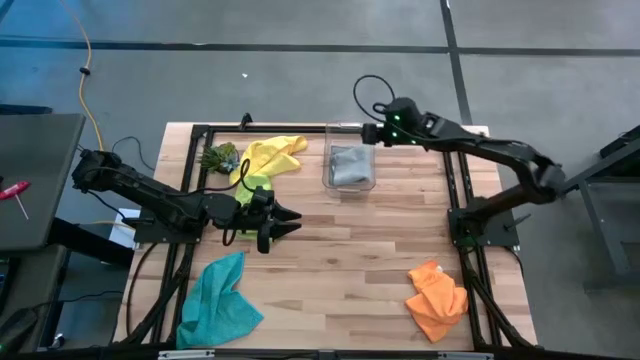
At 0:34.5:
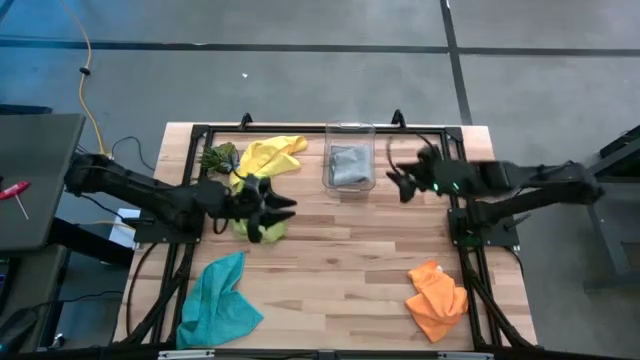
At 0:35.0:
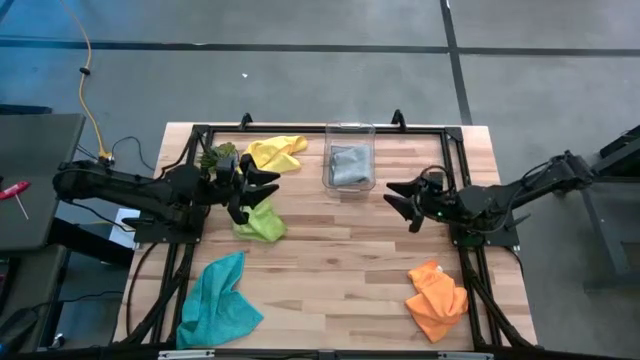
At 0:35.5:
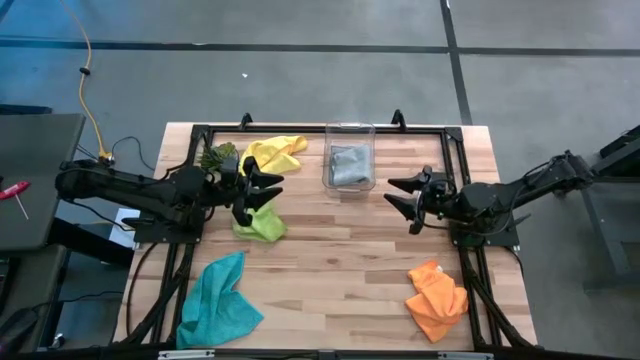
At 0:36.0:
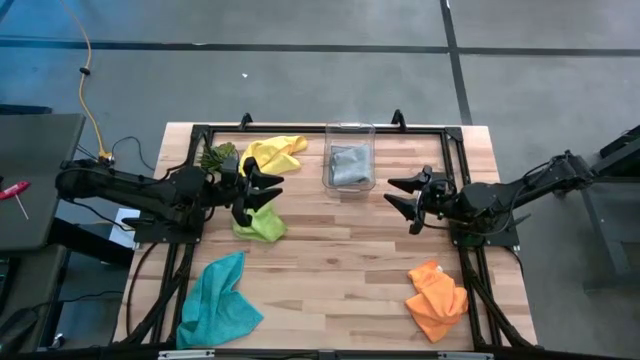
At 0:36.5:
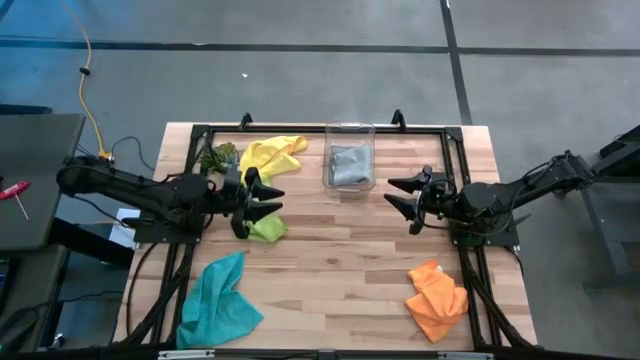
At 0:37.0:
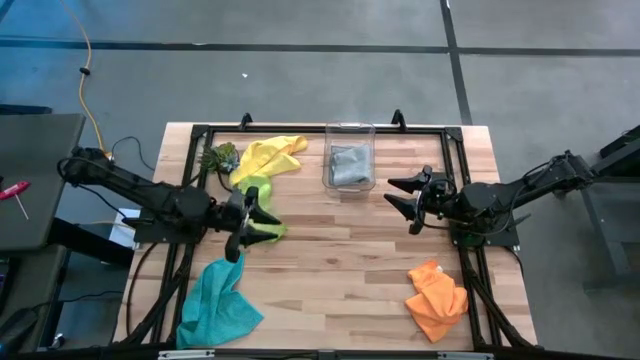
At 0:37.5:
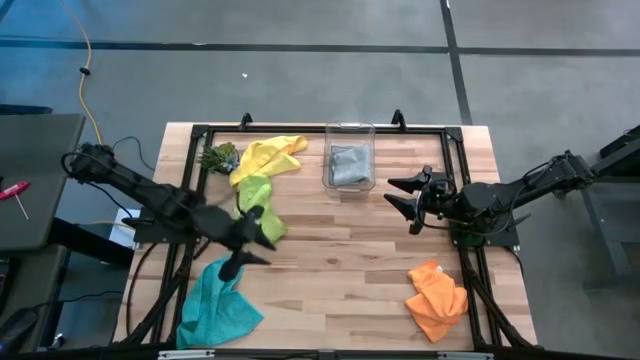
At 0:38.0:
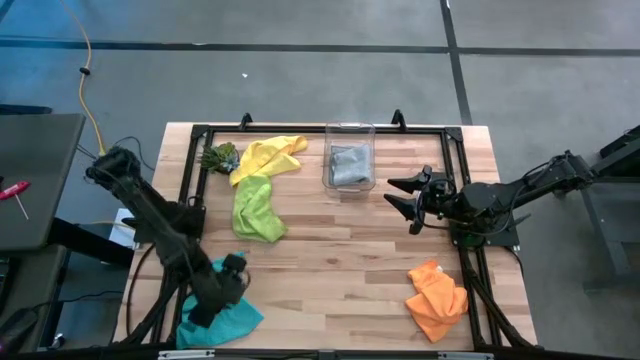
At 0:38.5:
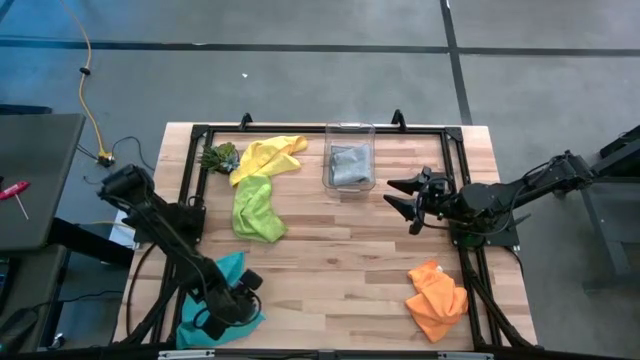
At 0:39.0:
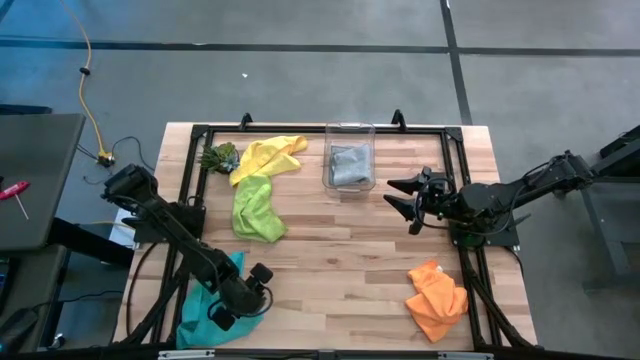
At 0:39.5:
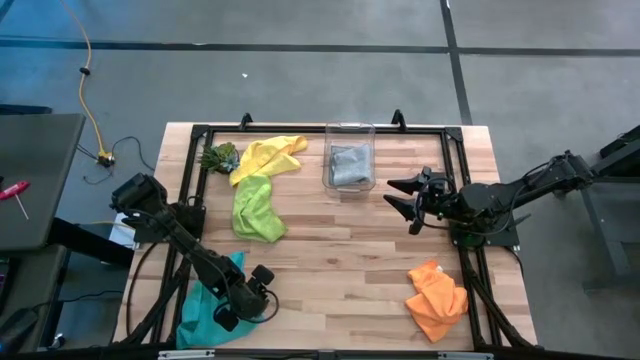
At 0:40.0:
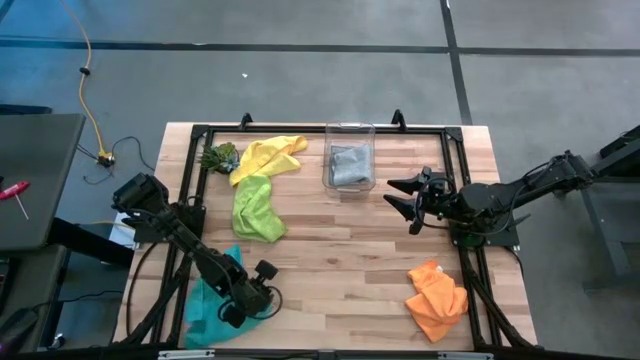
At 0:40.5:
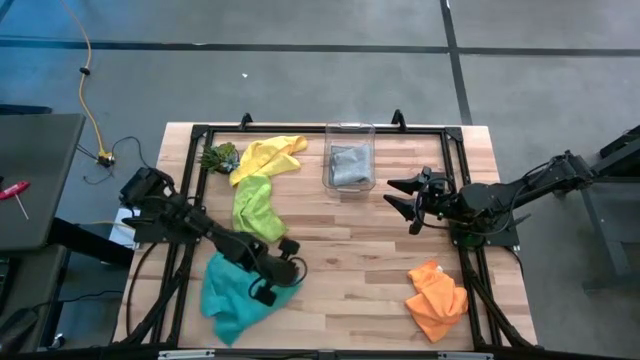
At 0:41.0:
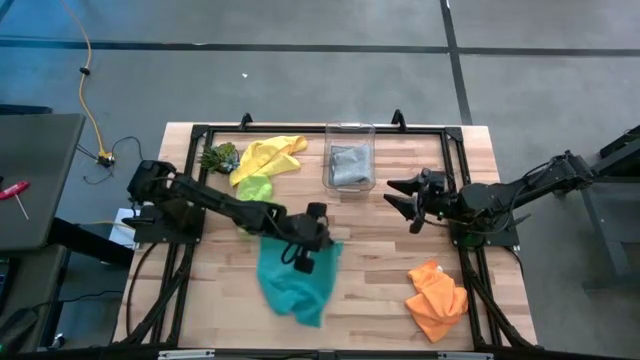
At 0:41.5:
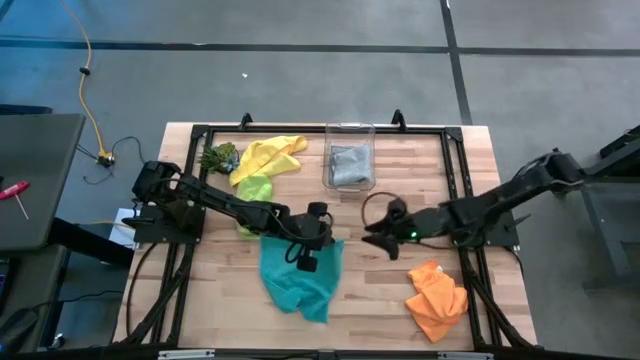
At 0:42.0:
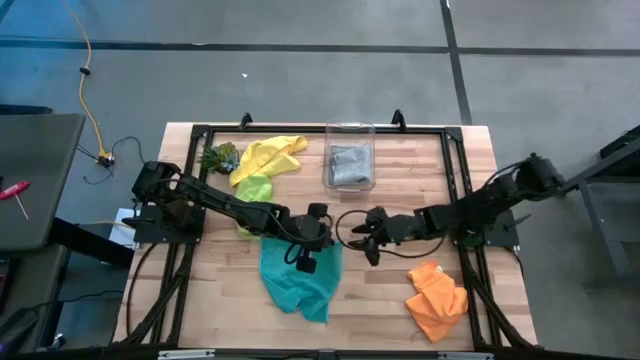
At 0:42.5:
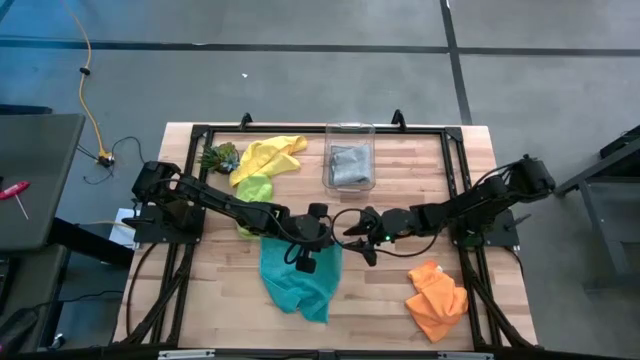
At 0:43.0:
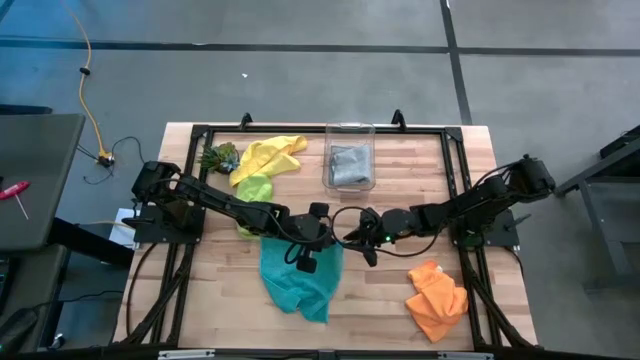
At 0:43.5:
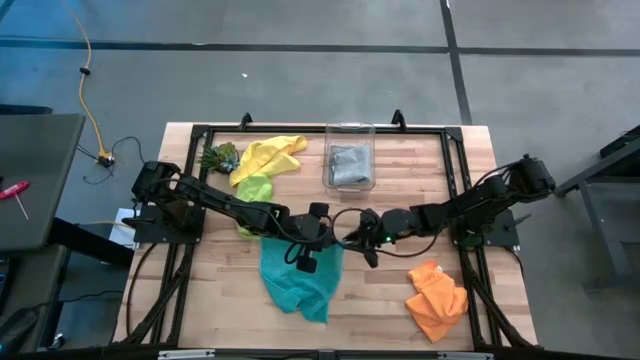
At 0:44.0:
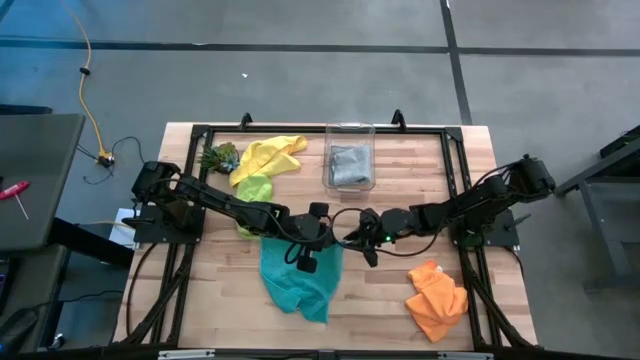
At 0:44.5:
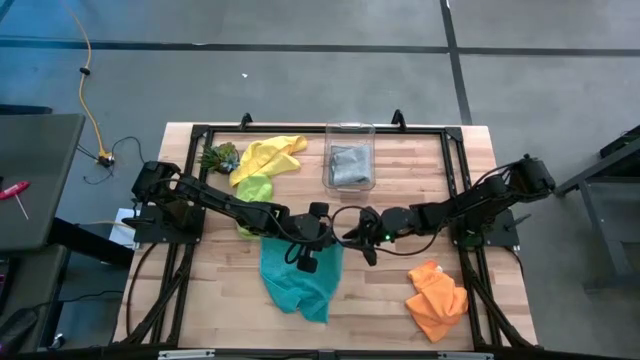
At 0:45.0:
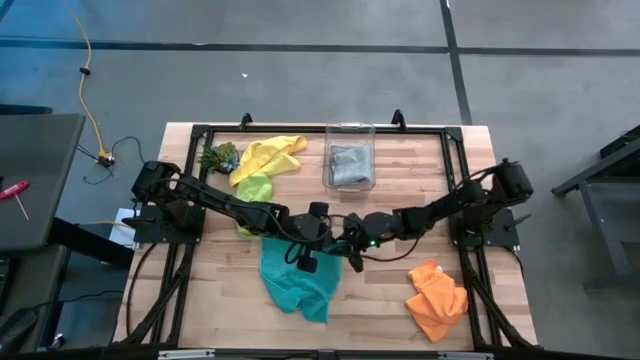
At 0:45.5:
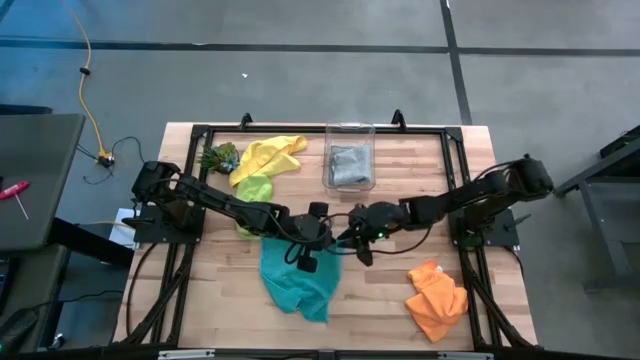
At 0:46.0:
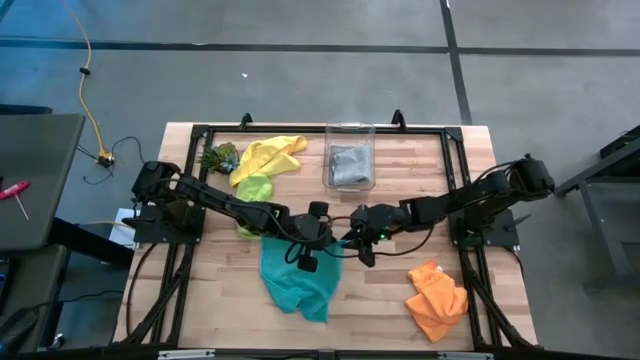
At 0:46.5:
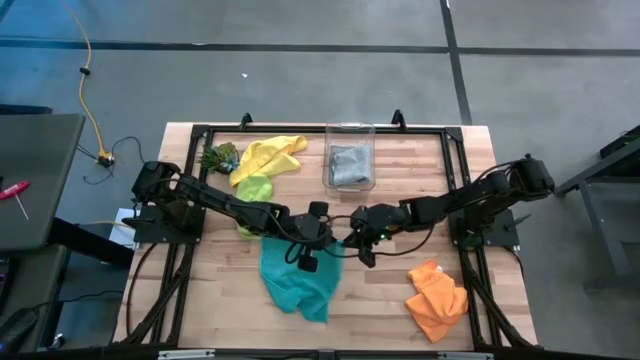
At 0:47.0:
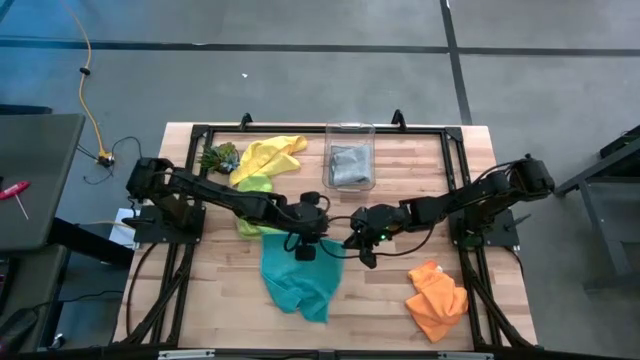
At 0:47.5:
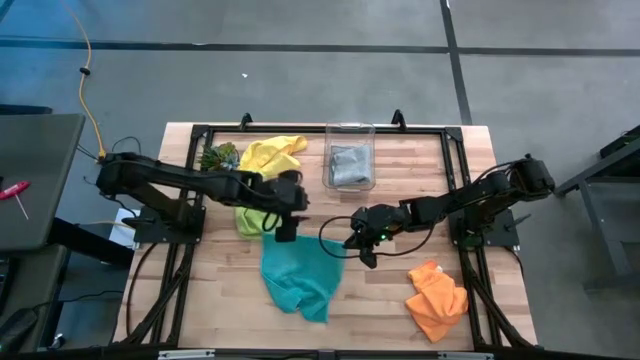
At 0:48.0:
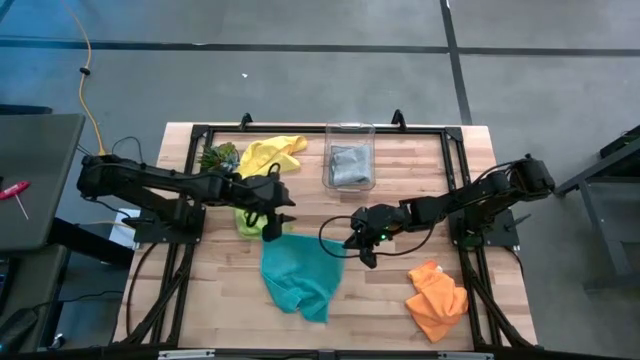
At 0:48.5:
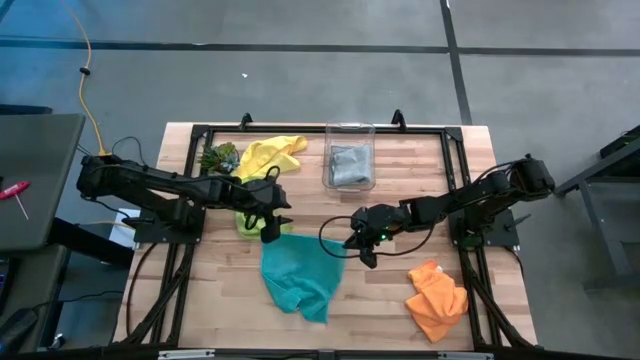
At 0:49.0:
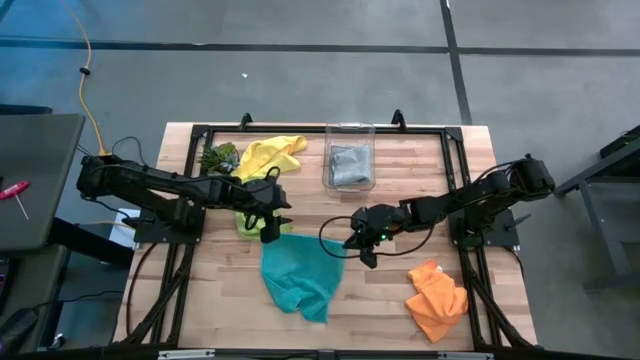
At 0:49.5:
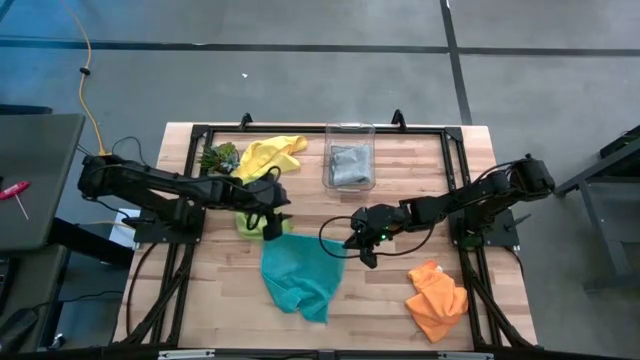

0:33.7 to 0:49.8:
Task: Fold microfiber towels
Fold the blue microfiber cloth

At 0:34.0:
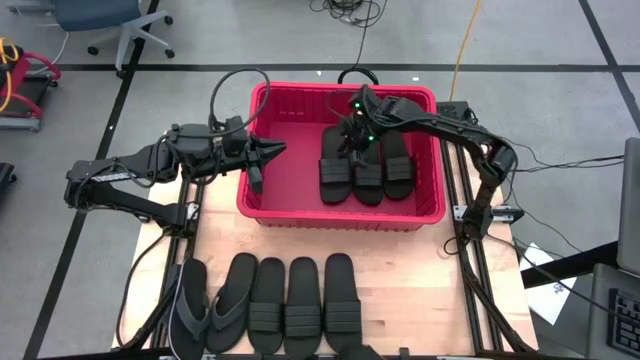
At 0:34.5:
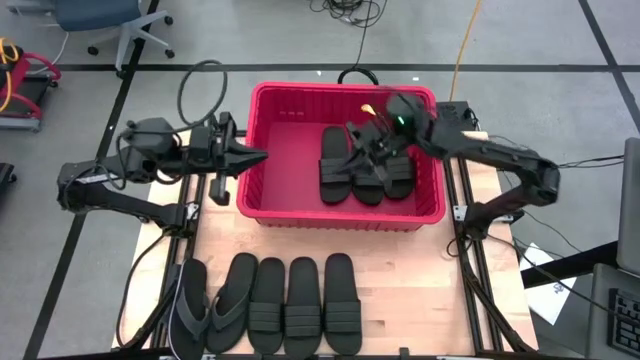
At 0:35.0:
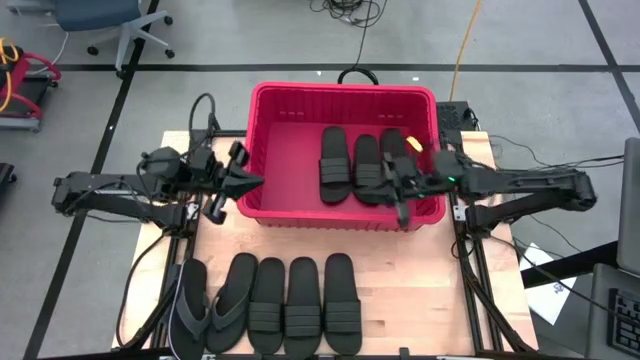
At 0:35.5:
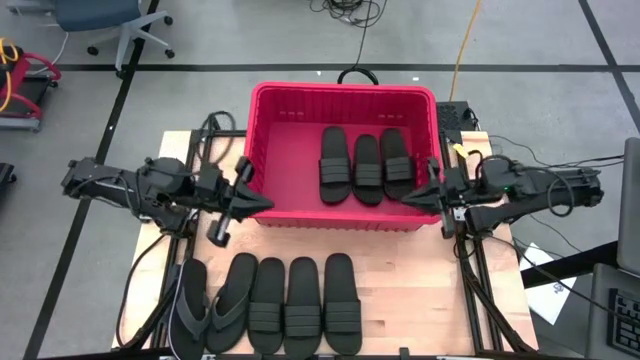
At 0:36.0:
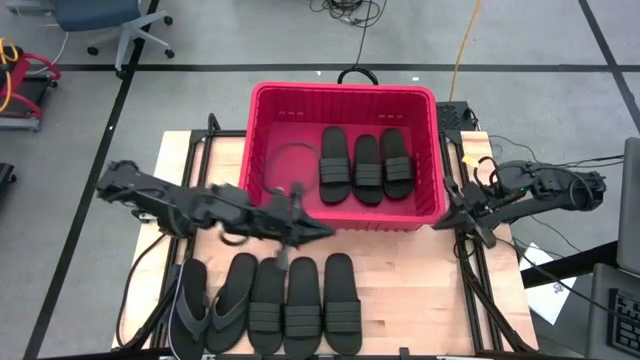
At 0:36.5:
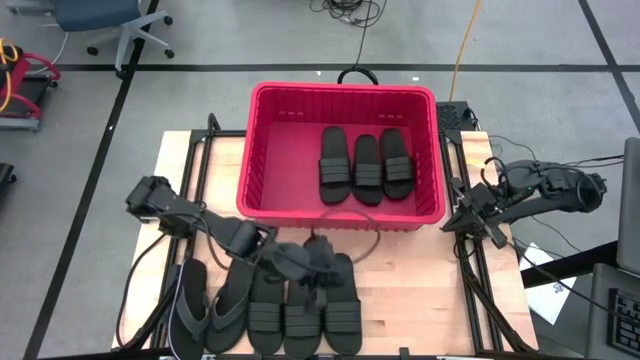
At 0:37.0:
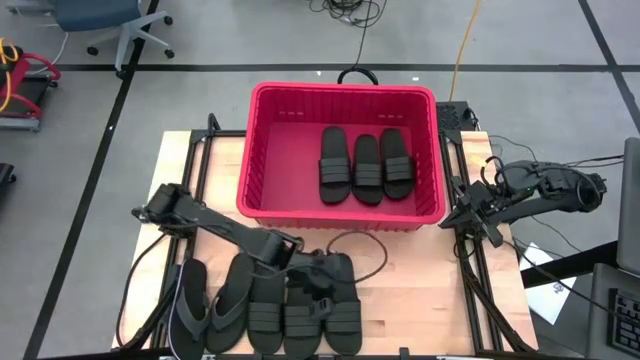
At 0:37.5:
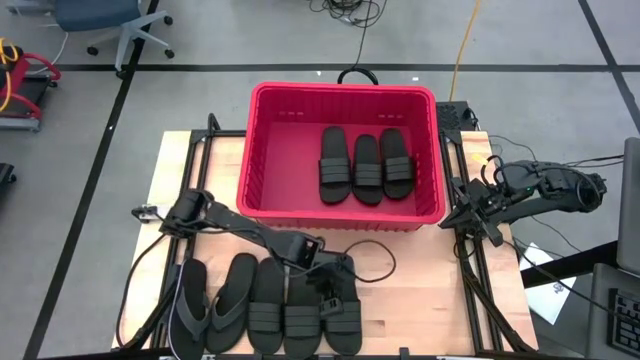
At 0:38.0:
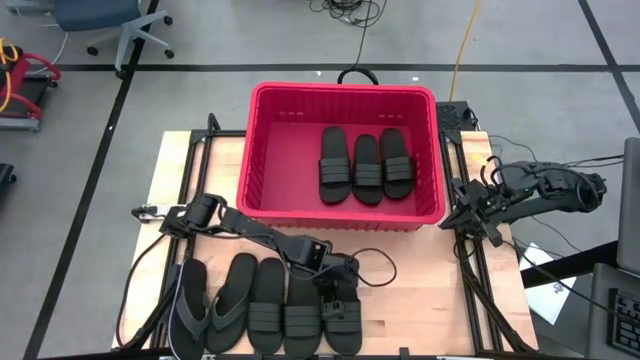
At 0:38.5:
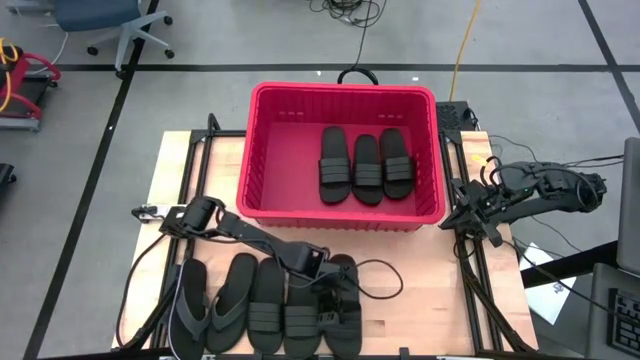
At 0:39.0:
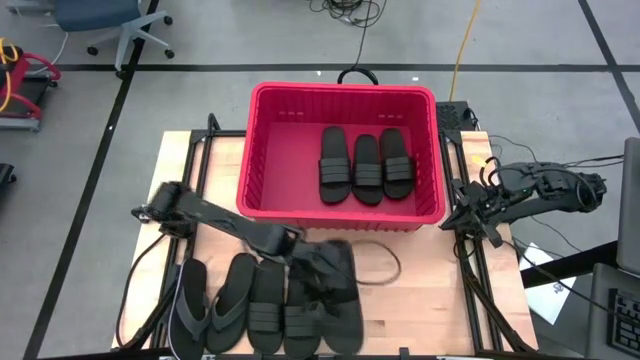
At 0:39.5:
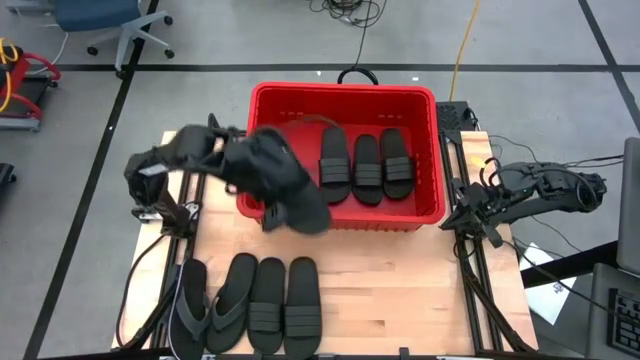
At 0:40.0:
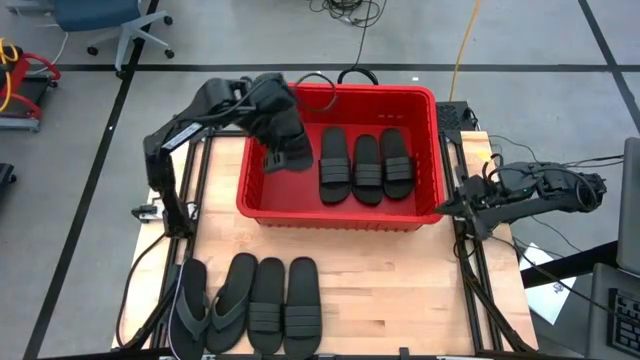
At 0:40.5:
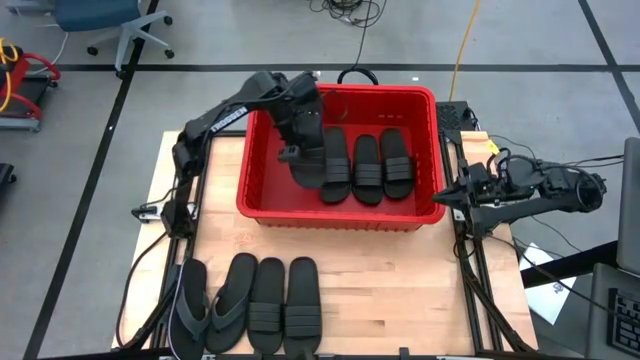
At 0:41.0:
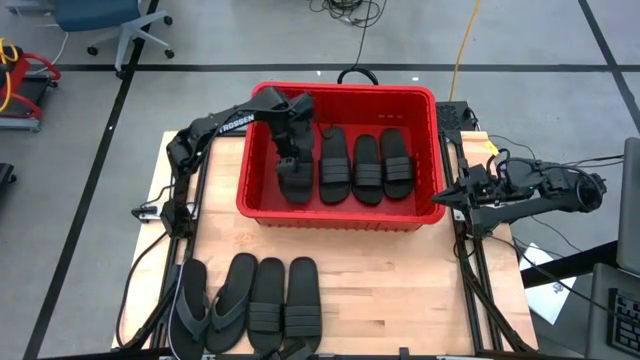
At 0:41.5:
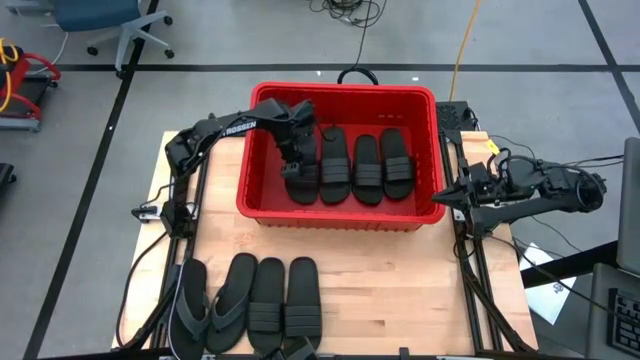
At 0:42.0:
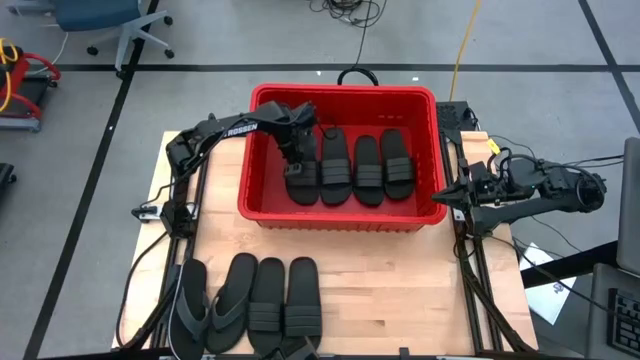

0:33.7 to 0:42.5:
Task: Pick and place slides into bin
Put the black slide into the red bin
